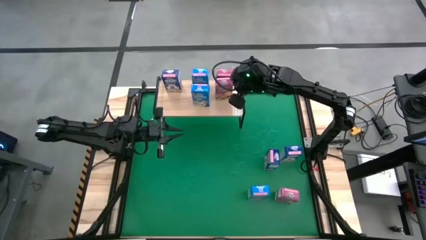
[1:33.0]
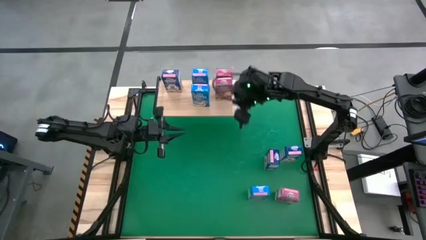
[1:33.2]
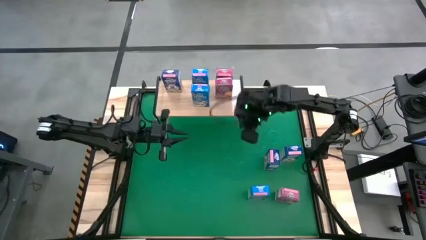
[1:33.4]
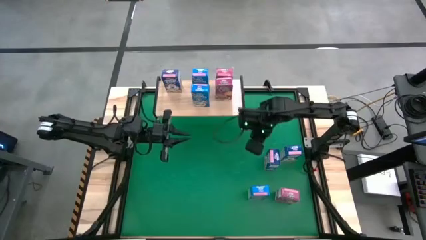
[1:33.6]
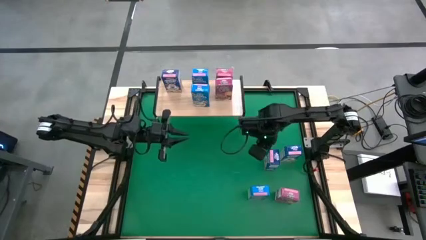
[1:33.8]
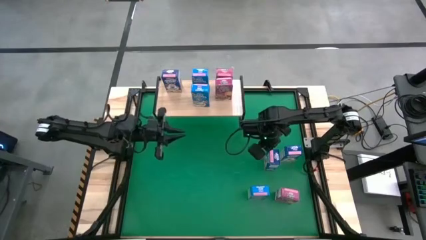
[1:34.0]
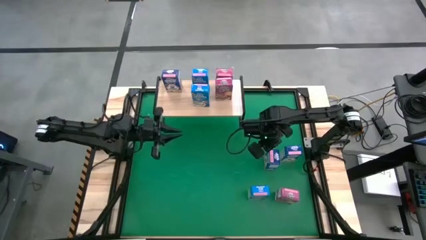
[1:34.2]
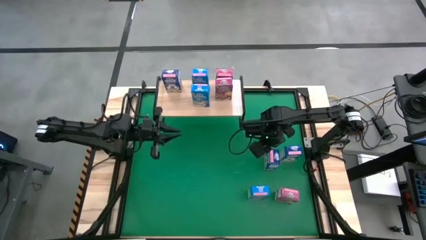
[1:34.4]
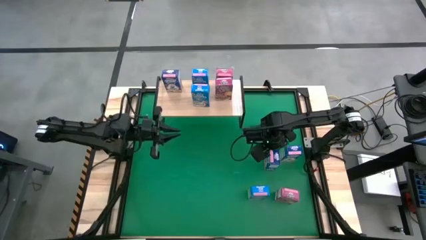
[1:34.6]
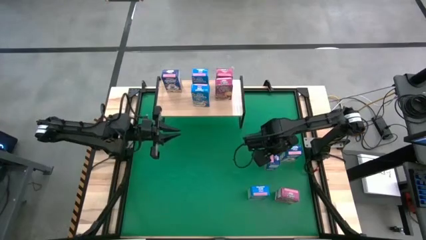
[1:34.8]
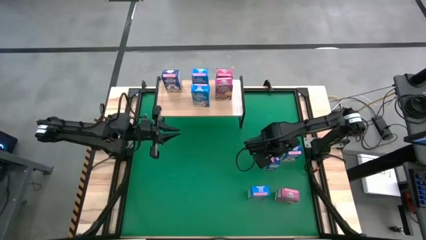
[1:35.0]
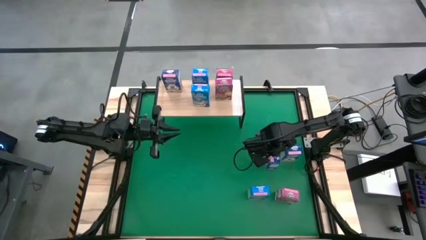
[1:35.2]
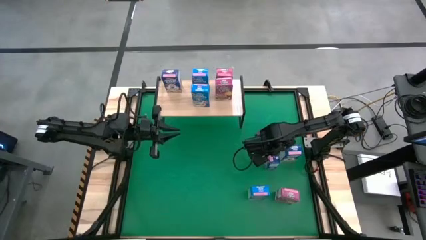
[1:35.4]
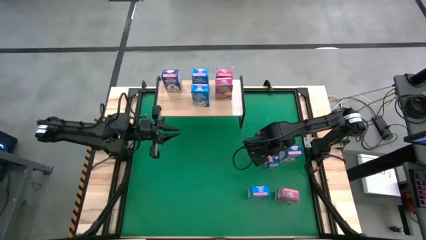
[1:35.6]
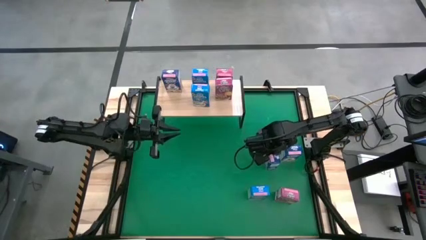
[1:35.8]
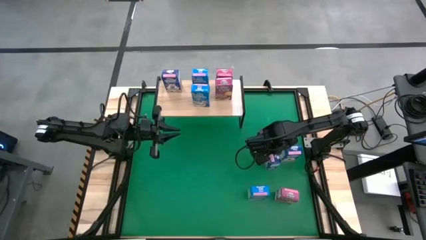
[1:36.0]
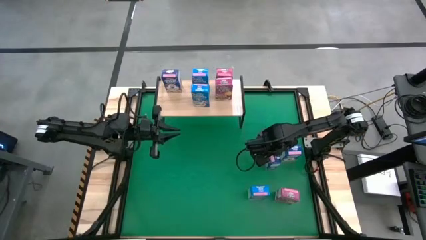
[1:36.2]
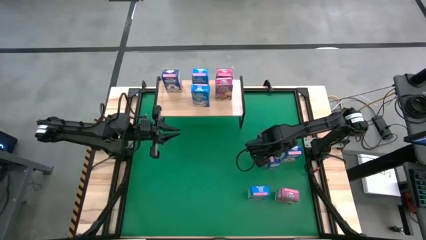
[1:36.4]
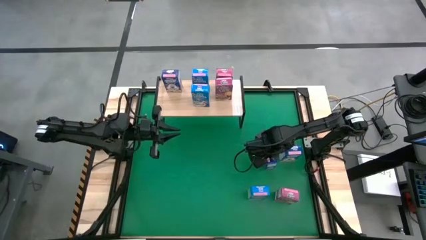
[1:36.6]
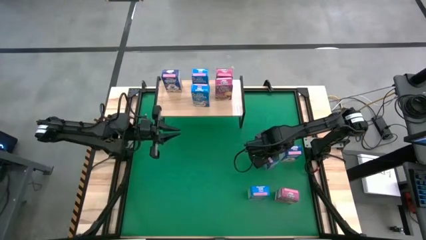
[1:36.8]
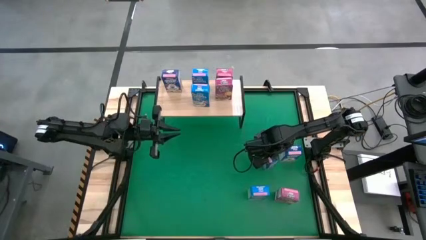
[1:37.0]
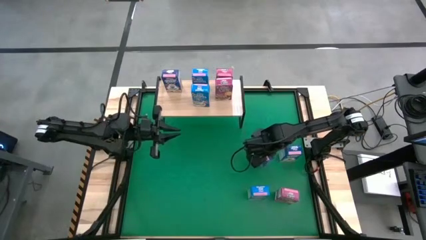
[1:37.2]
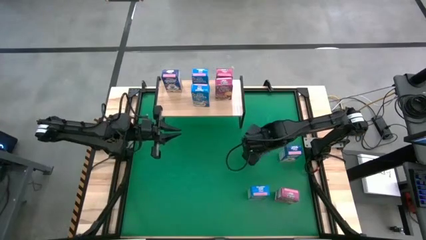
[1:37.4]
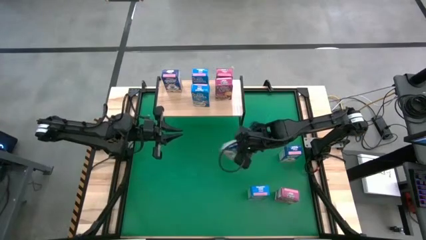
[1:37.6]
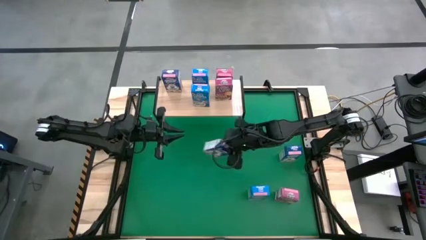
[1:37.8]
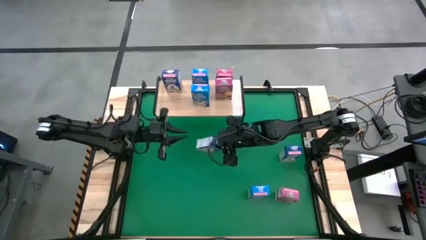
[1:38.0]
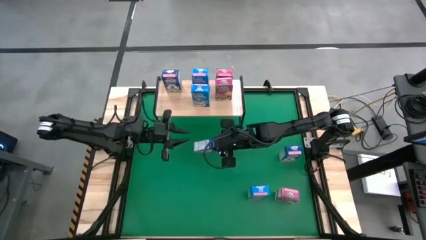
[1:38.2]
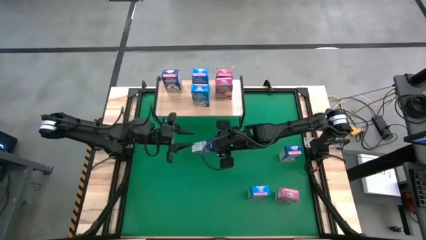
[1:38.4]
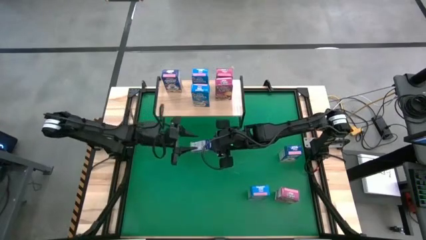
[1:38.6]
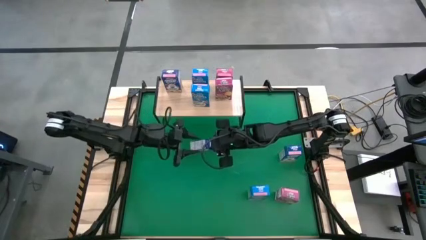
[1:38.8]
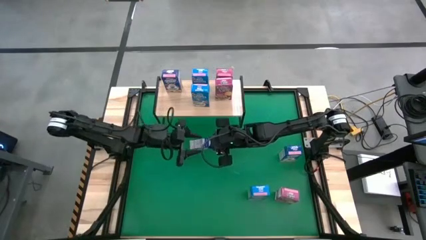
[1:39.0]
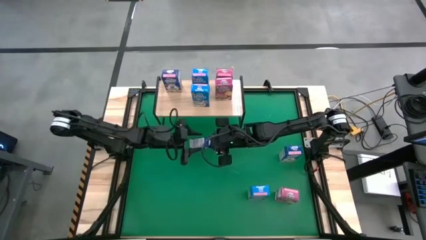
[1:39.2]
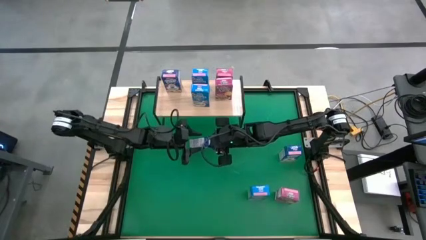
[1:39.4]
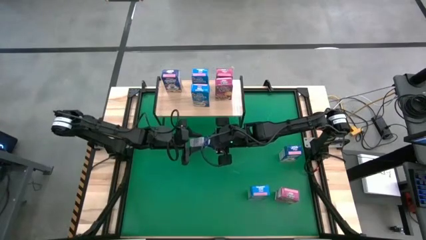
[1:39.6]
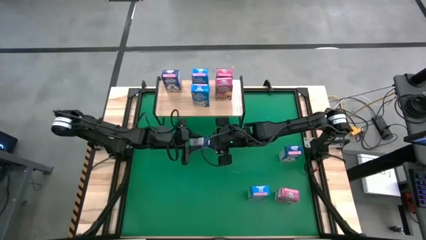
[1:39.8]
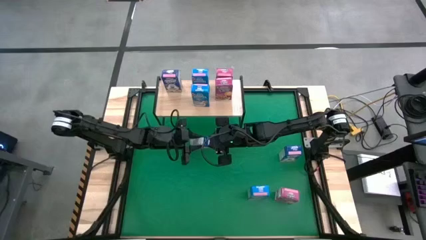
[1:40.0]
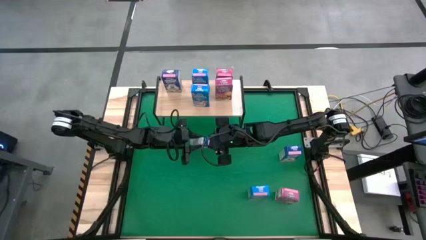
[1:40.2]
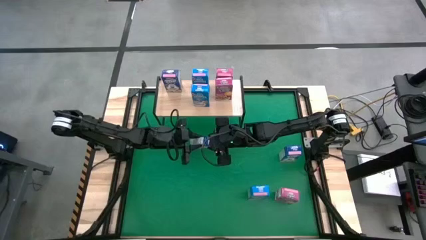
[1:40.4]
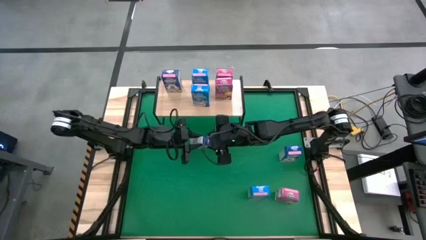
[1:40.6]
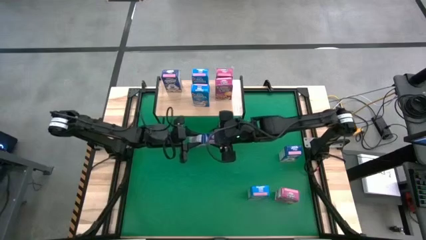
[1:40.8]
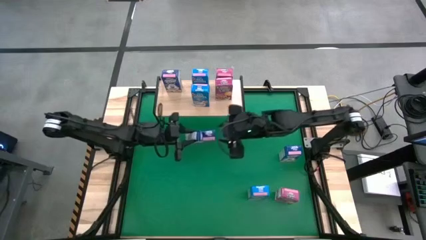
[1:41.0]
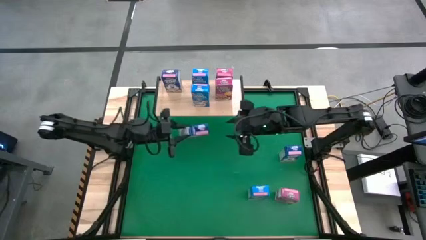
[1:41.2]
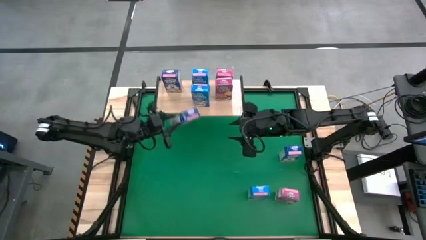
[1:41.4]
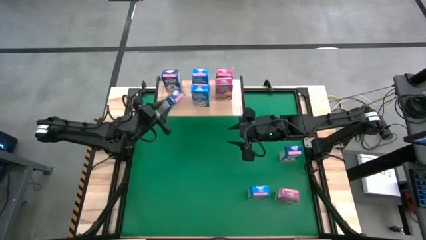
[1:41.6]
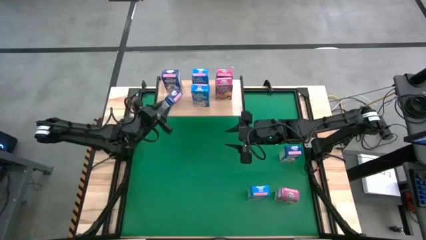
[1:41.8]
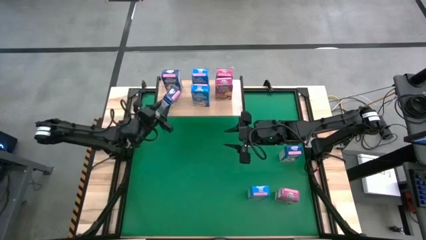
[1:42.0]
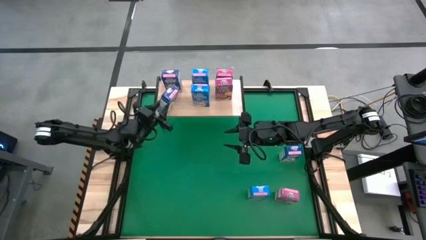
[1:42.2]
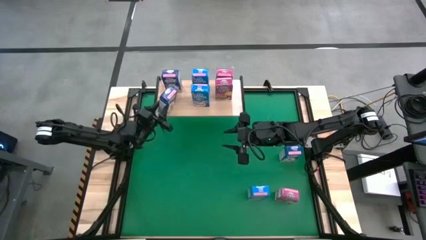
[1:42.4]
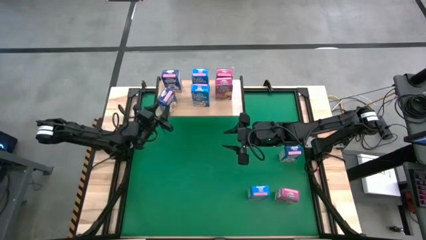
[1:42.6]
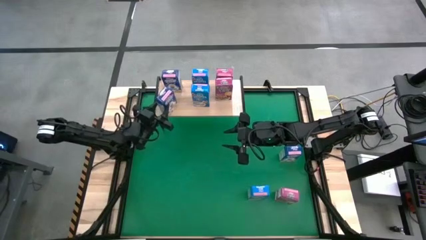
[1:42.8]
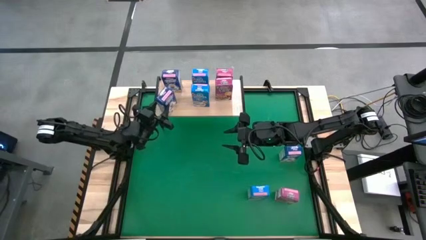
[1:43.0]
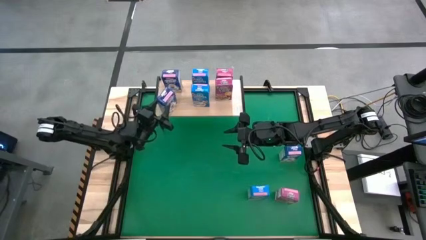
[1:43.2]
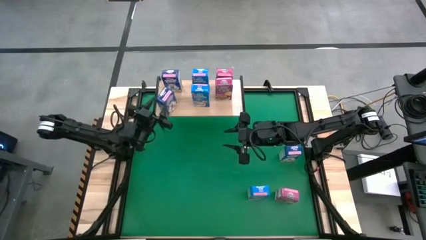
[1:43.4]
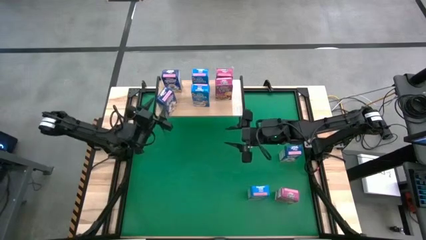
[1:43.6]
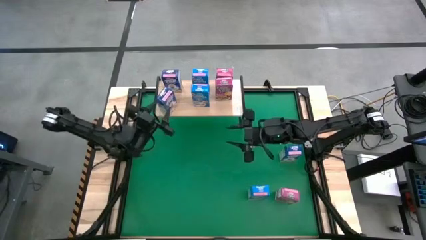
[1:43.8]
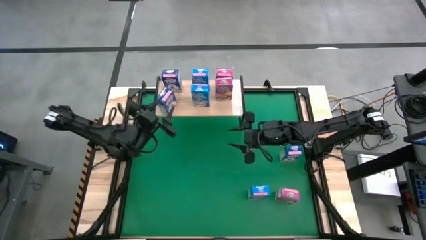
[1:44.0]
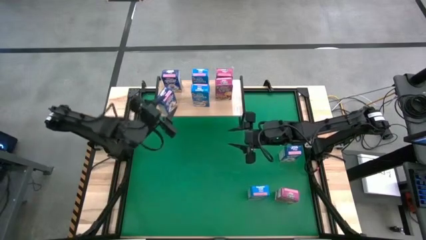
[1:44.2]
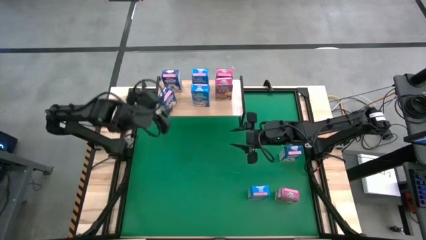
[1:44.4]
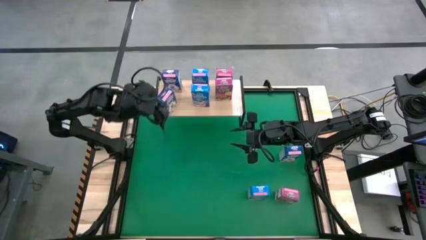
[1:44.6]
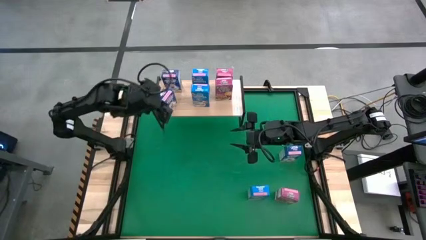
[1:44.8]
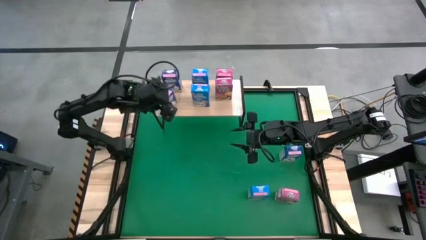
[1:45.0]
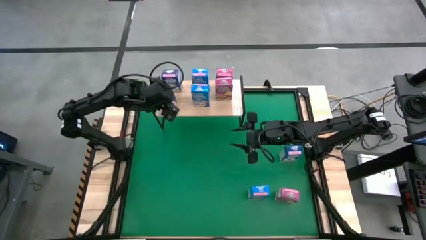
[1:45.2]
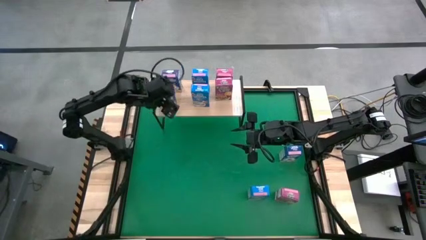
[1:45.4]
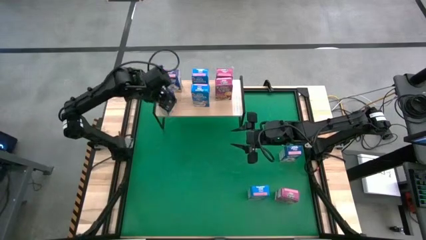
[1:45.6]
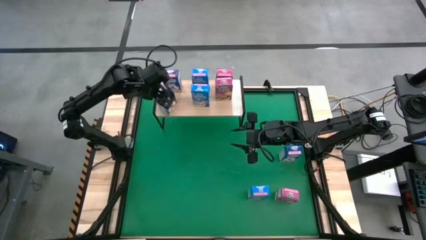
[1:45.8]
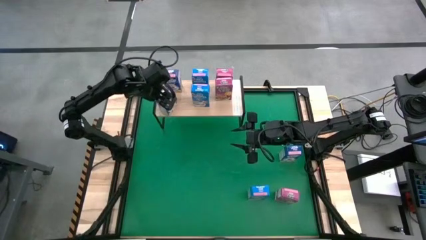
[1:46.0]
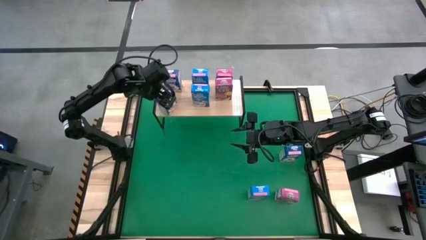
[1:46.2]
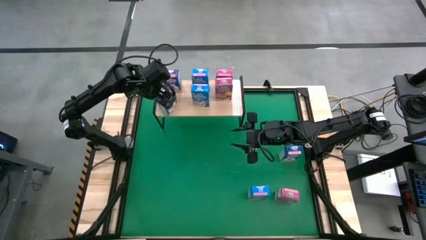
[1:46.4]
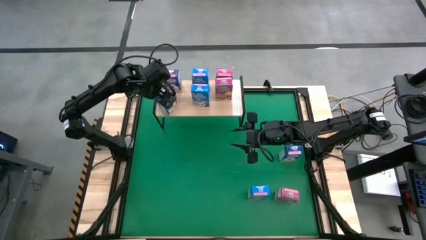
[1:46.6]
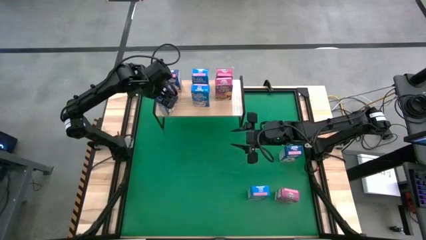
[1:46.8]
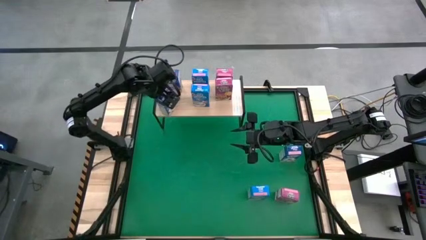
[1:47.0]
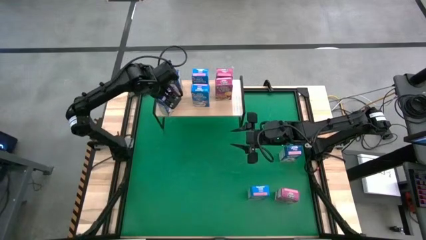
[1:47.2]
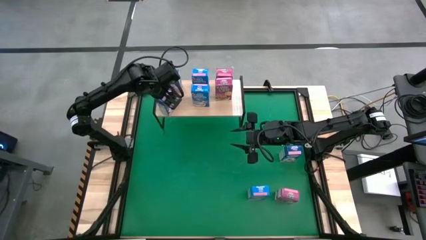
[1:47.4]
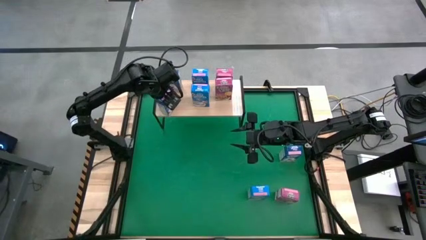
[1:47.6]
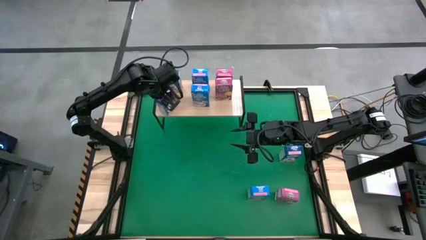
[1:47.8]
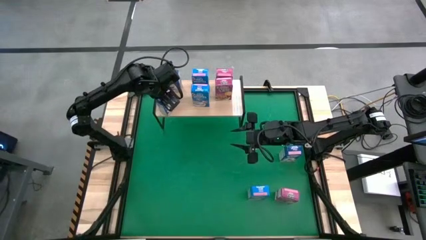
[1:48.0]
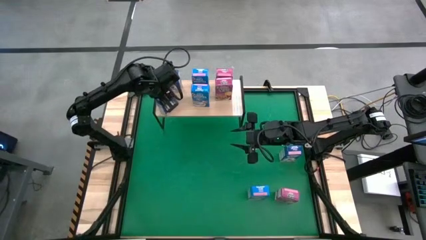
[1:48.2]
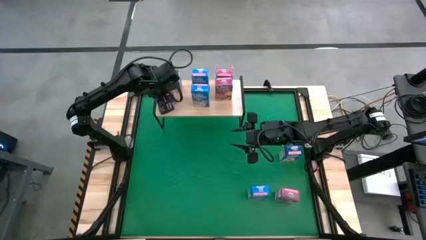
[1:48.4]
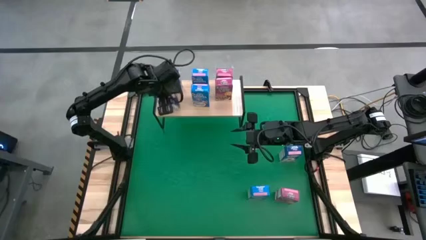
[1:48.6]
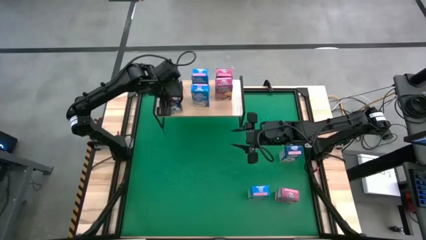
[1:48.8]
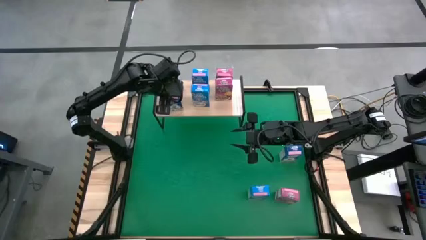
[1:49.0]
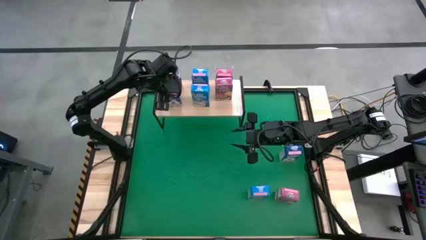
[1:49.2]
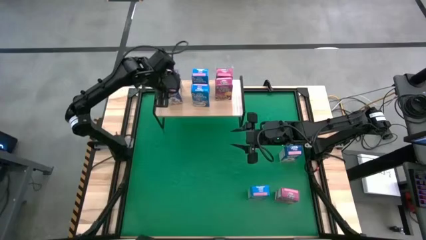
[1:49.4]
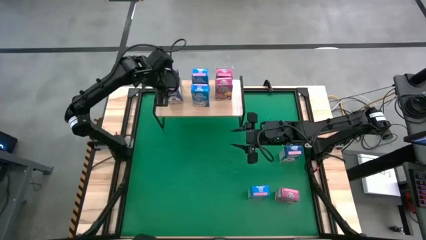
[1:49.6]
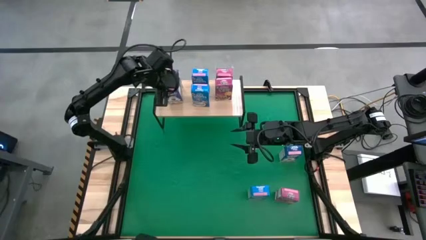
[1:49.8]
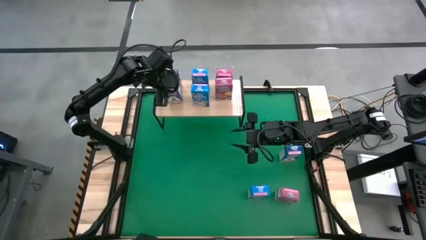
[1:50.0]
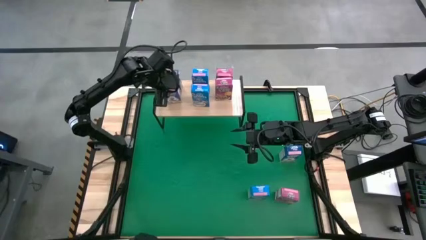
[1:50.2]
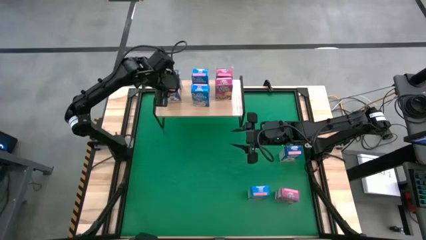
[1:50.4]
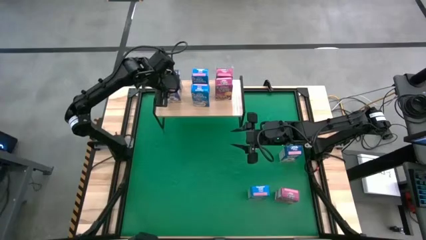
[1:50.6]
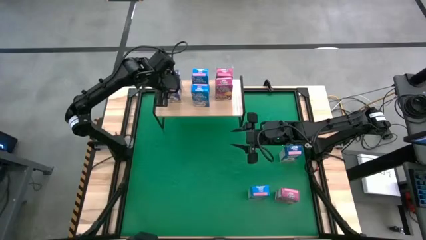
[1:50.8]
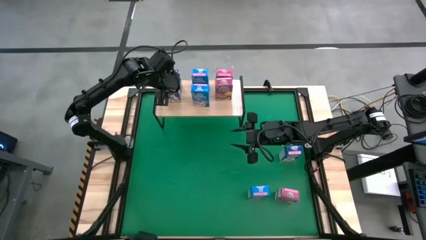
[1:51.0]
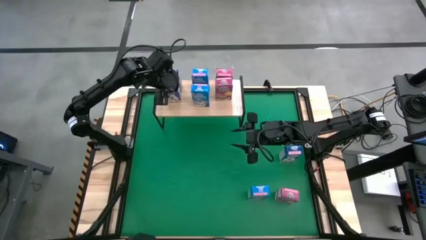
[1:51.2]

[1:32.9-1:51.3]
Task: Stack cereal on shelf
Put the left blue cereal box on the shelf aligned with the other blue cereal box
